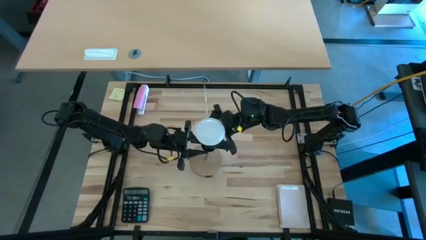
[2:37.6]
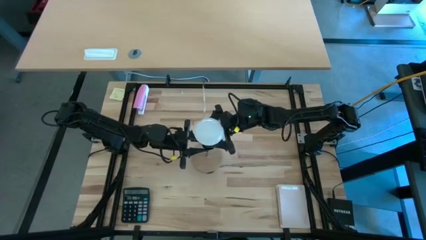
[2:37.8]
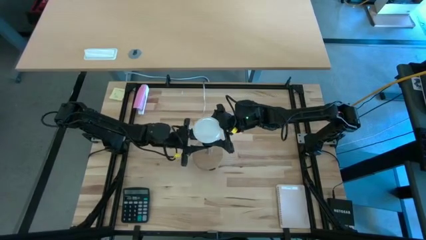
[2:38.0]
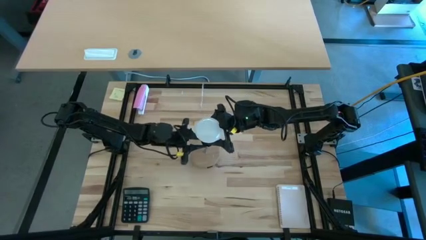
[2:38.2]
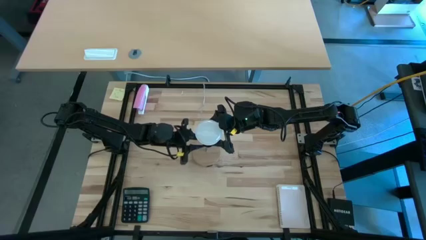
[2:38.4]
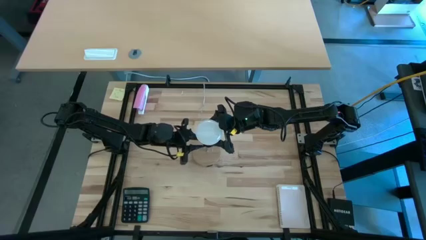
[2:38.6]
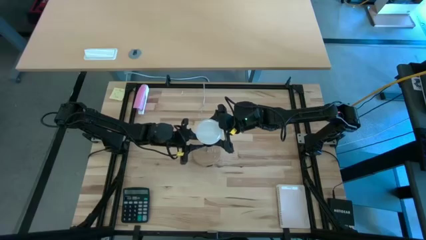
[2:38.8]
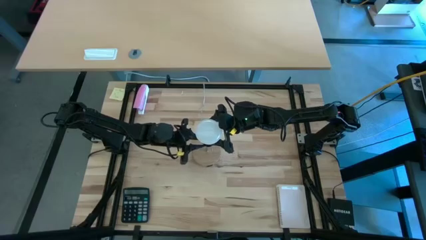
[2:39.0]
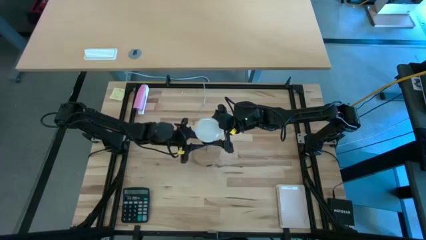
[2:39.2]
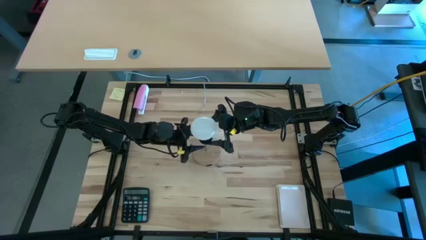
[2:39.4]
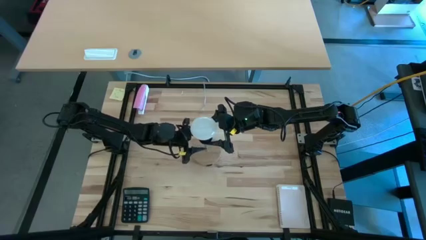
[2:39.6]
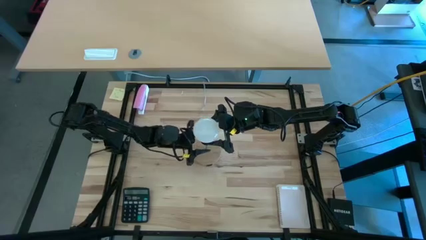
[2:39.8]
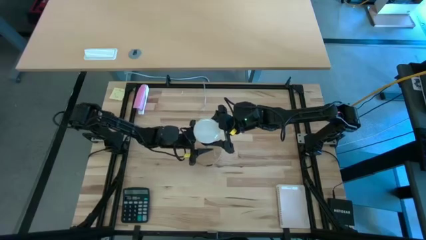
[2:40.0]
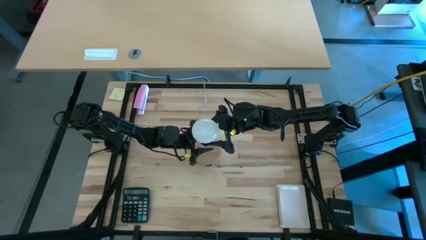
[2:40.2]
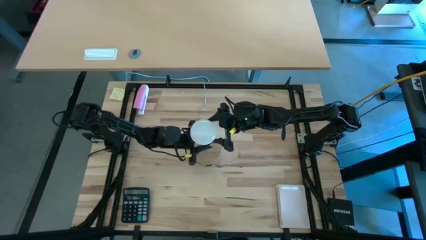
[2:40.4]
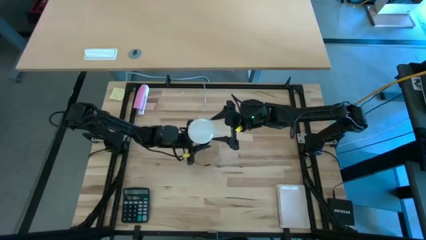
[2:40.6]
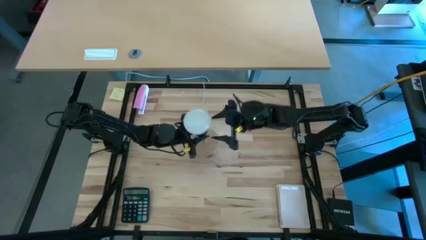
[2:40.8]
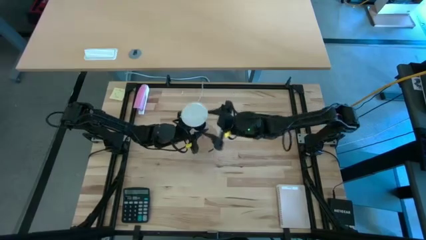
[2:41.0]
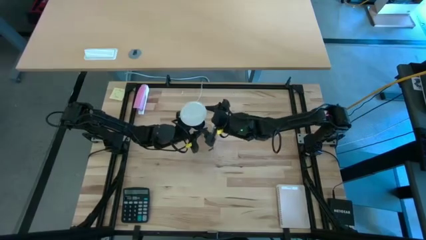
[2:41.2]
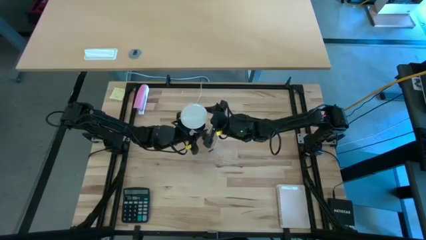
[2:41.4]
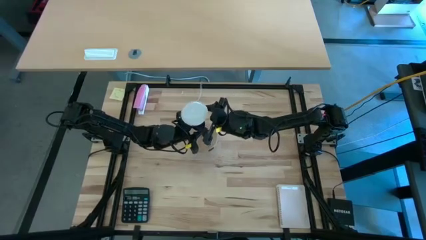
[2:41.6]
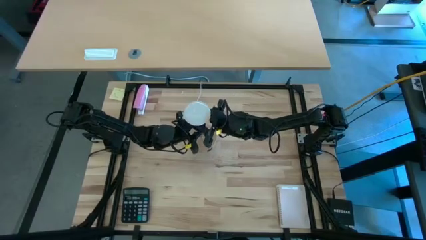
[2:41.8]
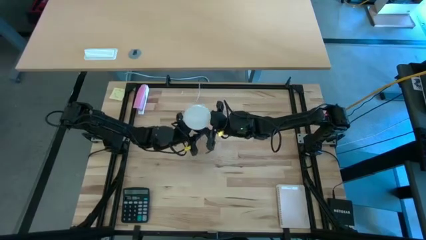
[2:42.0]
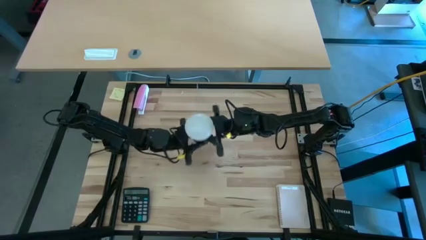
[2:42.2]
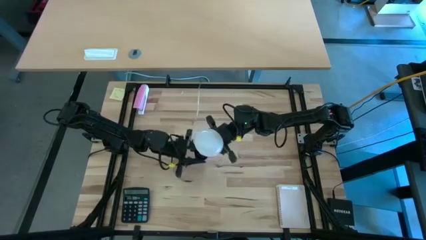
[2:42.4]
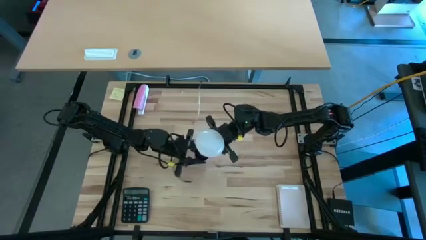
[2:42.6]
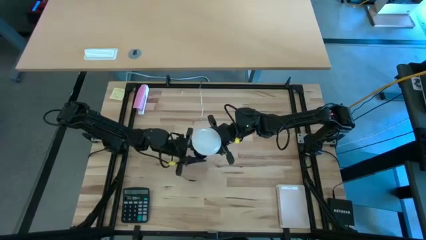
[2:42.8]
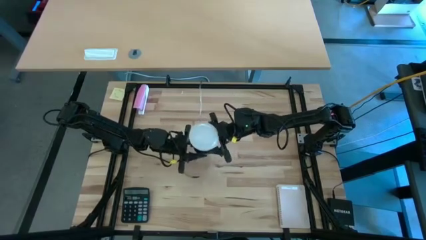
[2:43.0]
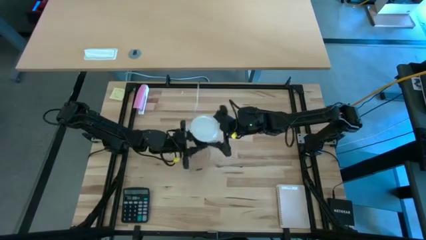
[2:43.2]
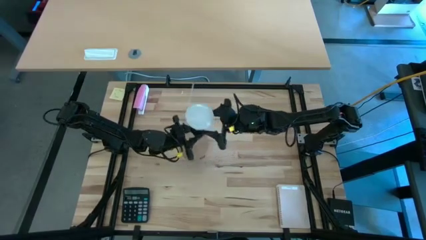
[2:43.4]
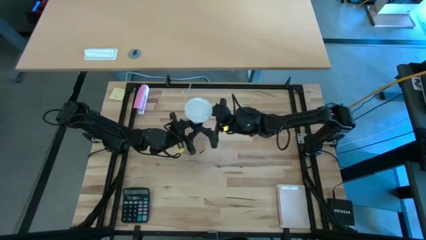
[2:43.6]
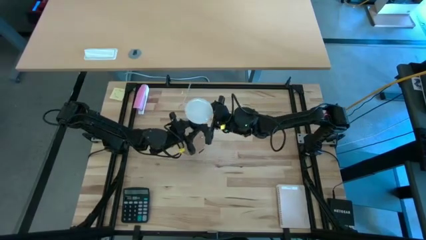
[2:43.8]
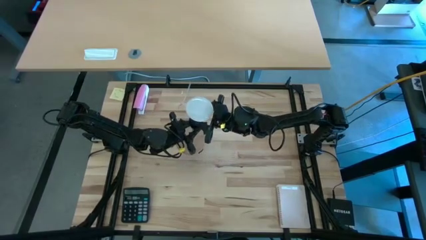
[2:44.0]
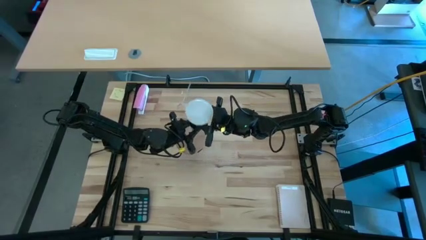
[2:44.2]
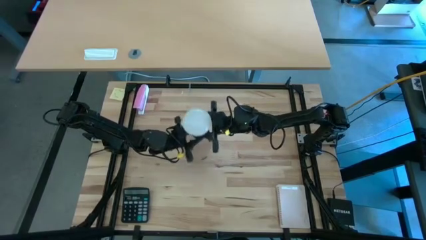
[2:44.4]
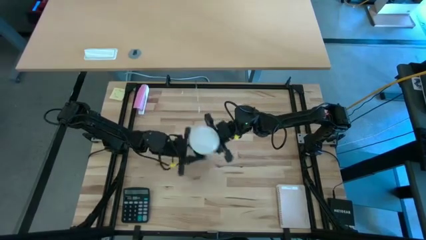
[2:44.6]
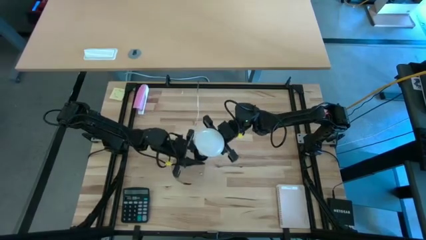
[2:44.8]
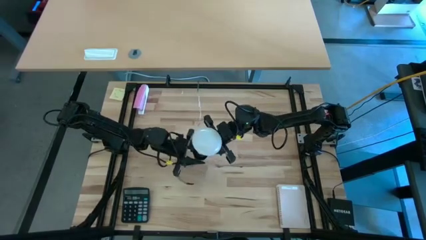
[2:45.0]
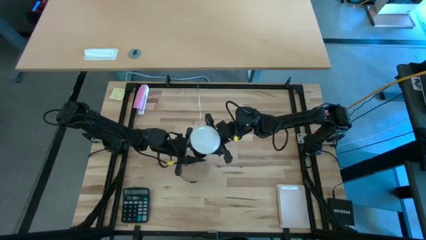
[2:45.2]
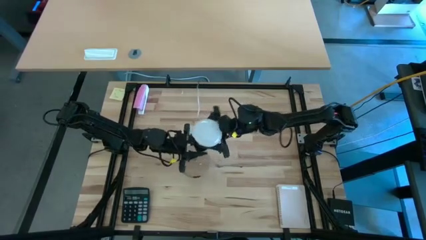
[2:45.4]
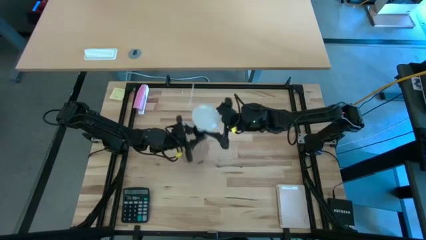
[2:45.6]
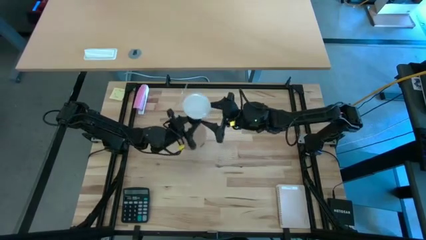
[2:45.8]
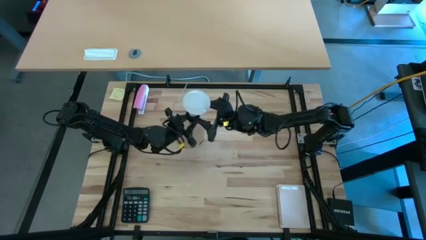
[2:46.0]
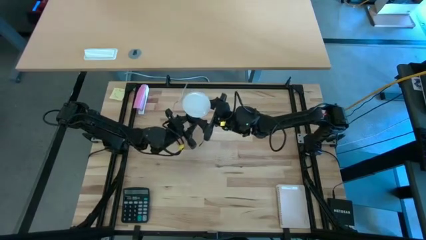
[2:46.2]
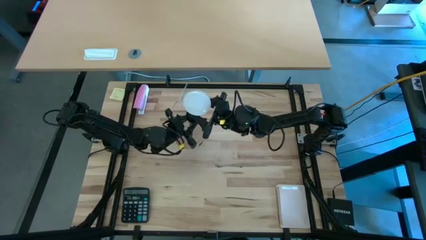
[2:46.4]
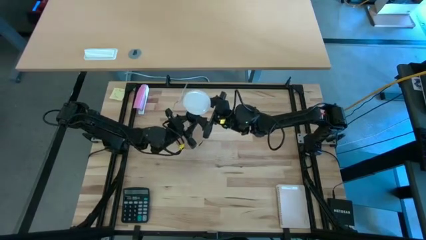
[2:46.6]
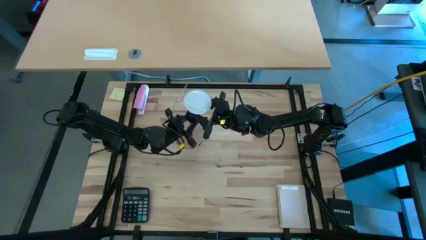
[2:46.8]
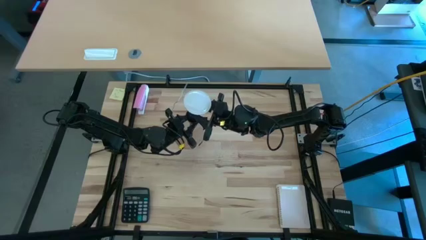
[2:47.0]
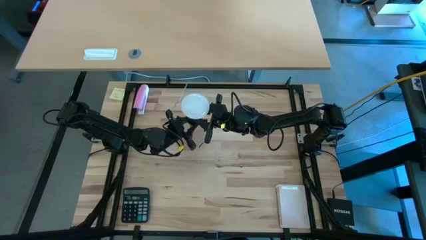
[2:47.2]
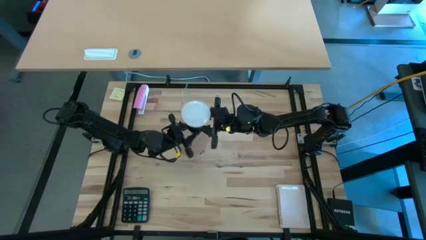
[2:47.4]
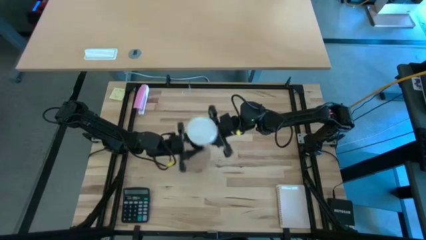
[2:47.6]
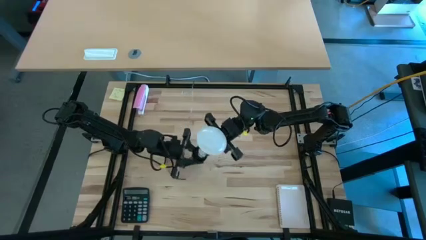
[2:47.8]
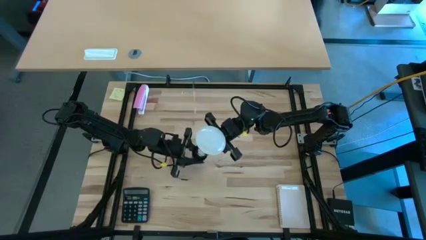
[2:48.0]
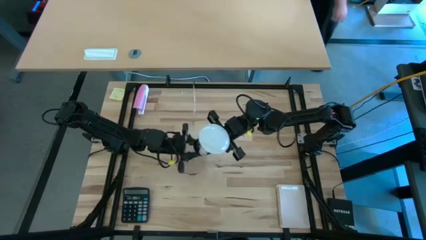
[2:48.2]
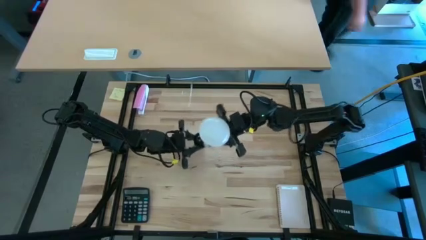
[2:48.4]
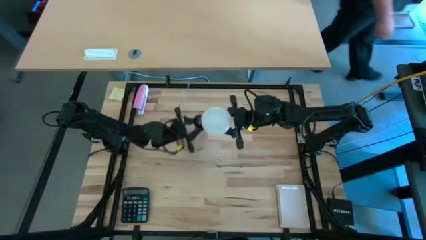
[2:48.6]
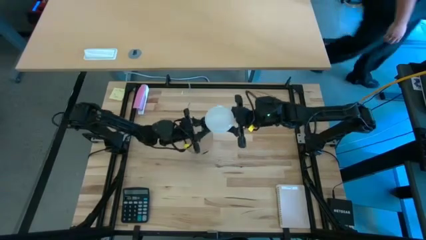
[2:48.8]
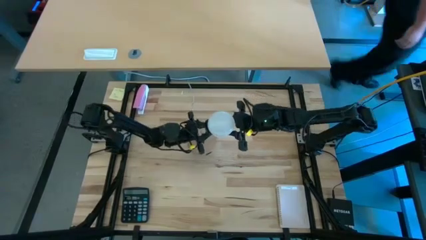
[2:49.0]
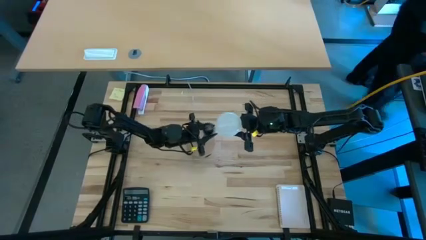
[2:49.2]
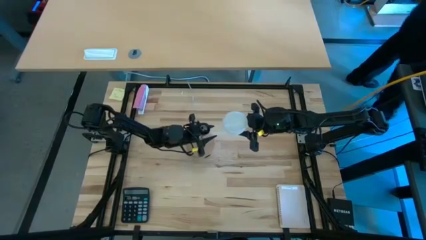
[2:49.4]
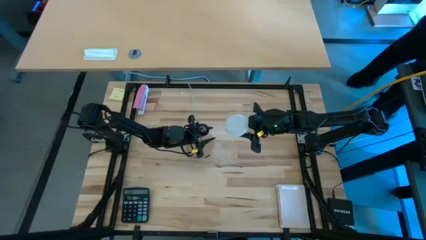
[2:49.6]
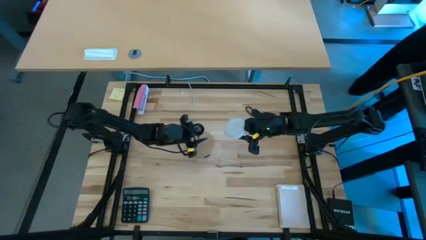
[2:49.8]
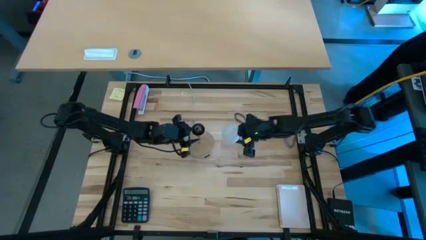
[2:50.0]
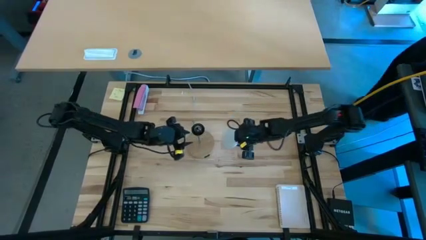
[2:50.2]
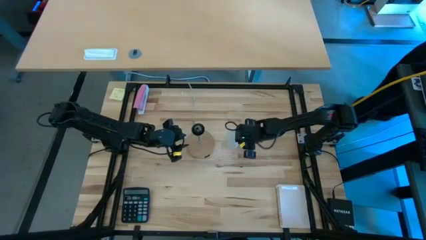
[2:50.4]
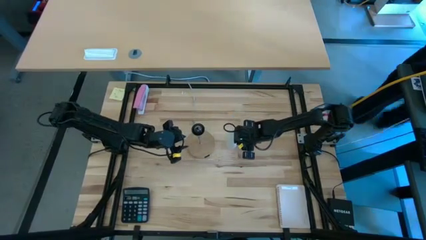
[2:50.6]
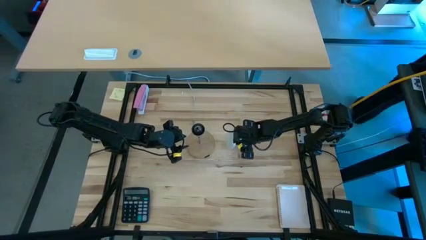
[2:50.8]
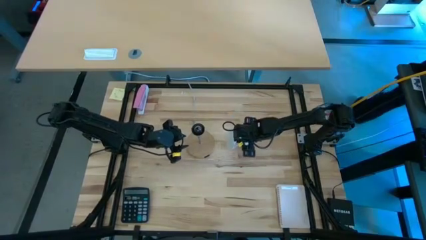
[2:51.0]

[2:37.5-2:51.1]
Task: Screw lightbulb
Remove the lightbulb from the desk lamp

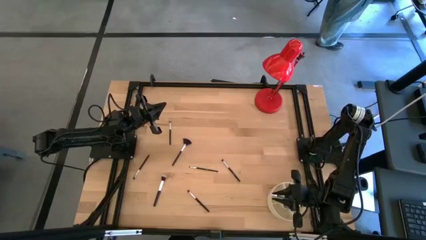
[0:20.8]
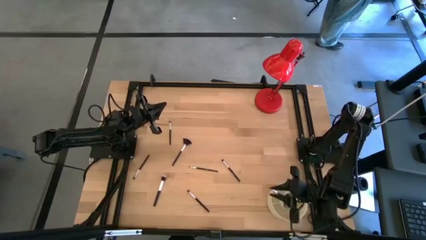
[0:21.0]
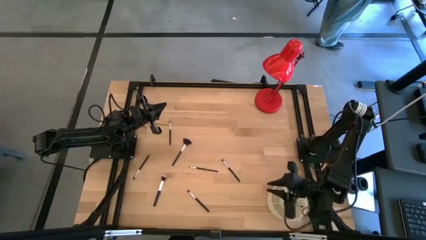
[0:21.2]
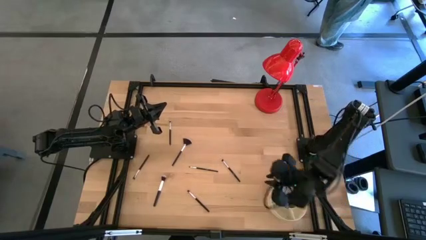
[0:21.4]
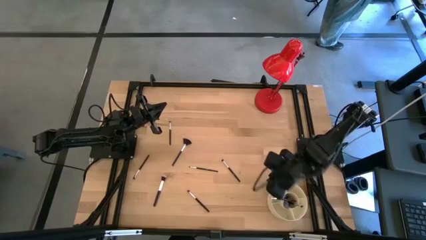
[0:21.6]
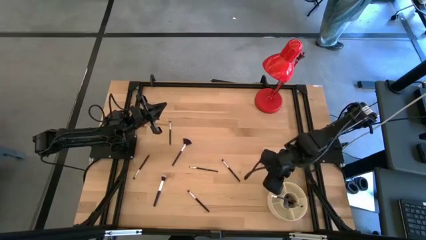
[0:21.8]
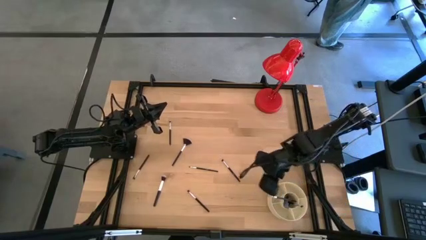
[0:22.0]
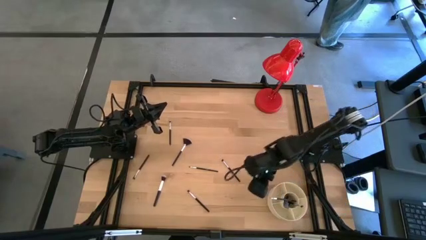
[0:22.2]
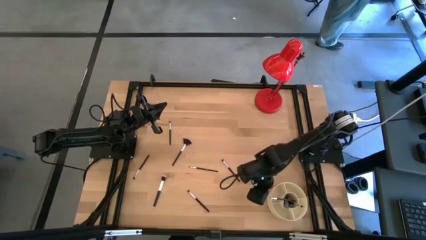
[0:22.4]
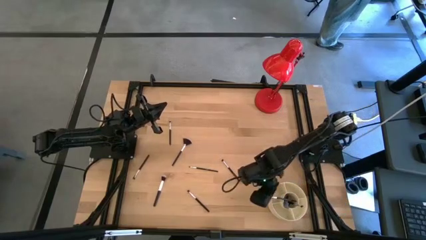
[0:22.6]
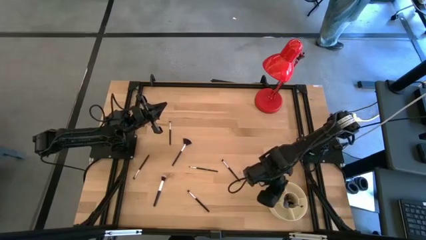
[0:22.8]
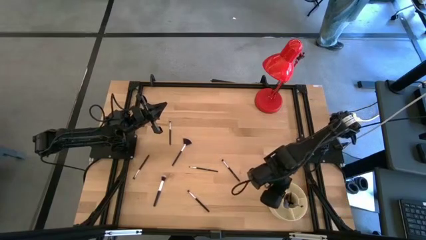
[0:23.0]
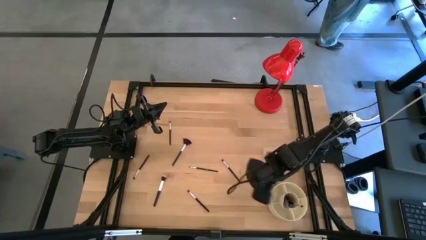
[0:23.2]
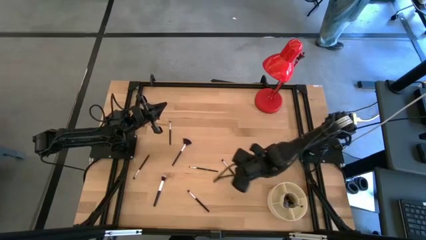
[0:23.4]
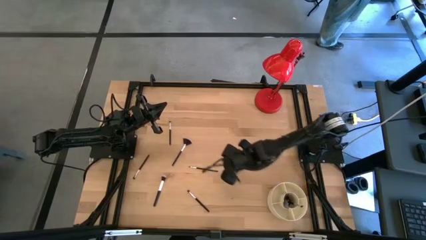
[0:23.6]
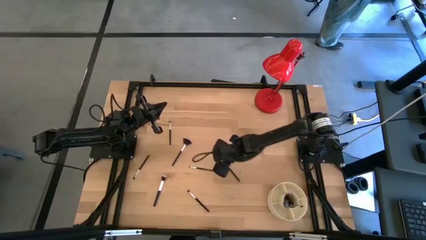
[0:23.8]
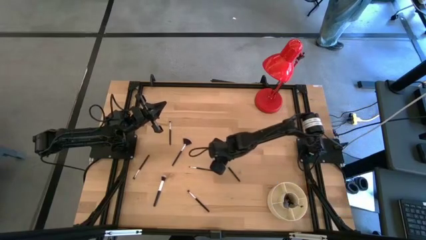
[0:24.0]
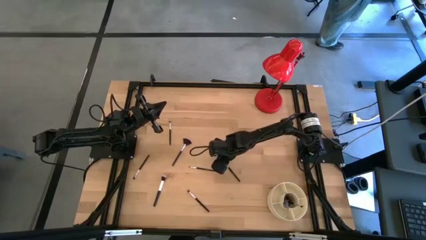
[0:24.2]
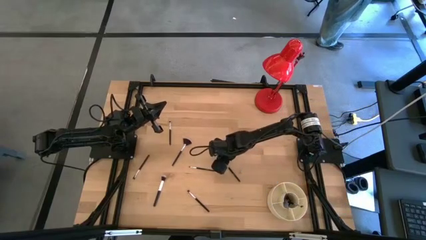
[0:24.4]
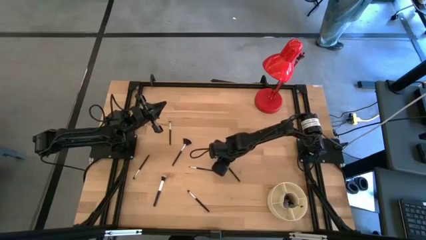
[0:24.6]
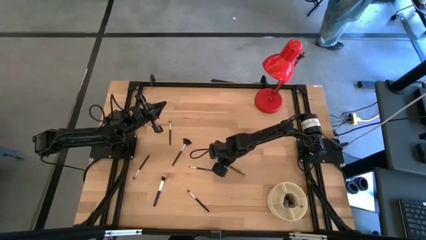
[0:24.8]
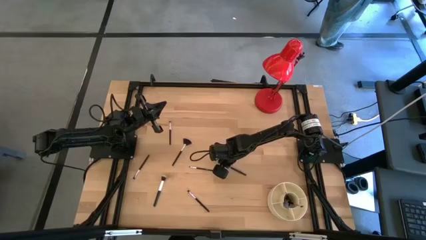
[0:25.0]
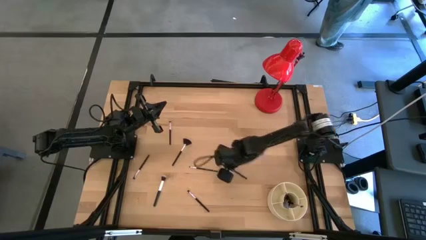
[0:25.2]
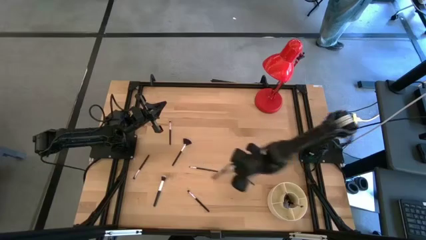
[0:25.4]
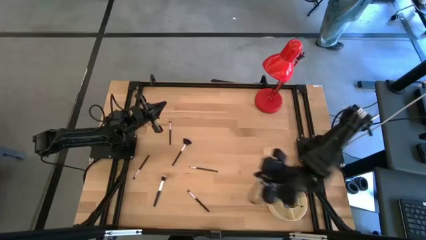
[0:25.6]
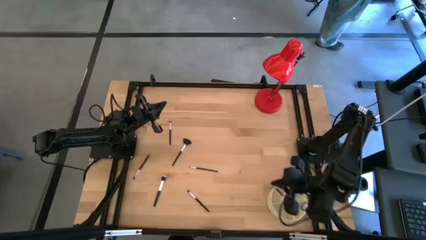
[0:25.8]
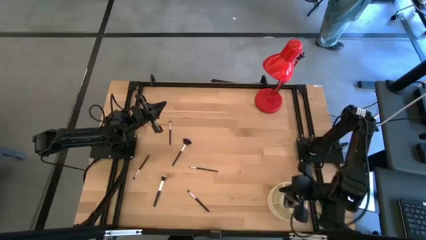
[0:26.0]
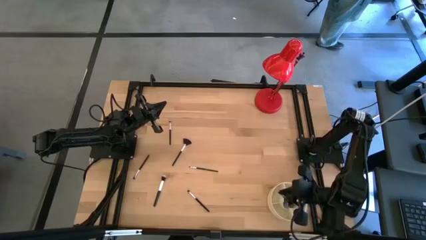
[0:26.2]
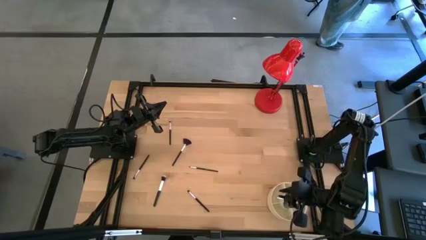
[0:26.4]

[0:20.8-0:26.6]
Task: Put items in baskets/containers
Put the black eyeshadow brush into the yellow pen organizer
